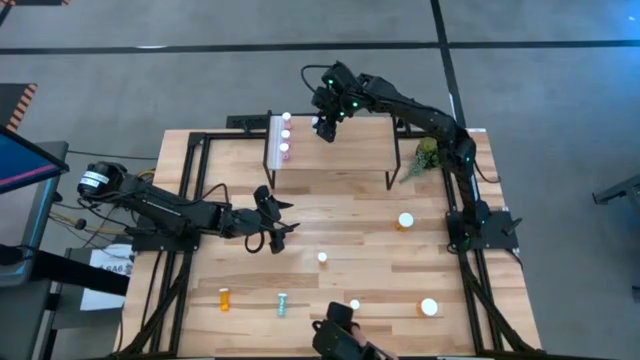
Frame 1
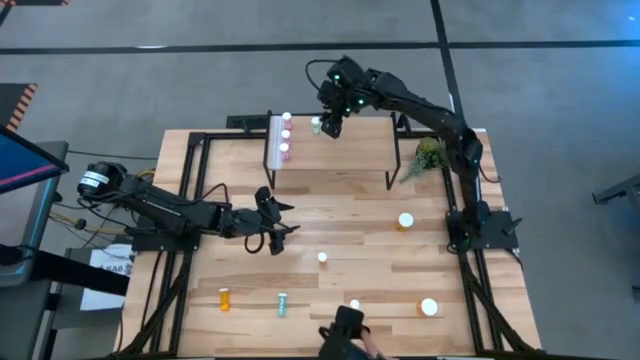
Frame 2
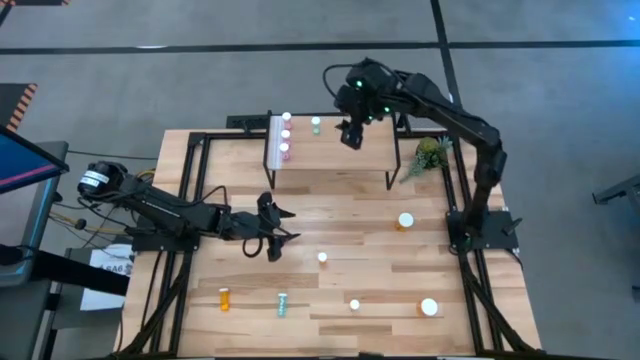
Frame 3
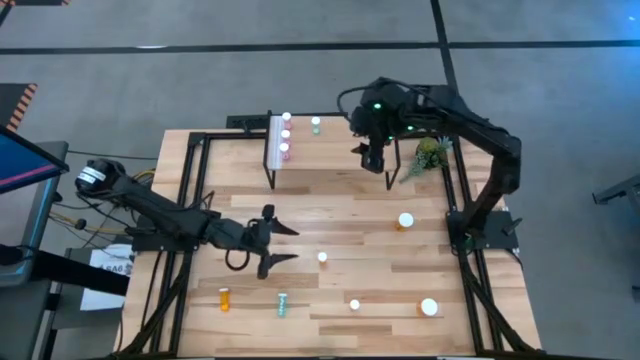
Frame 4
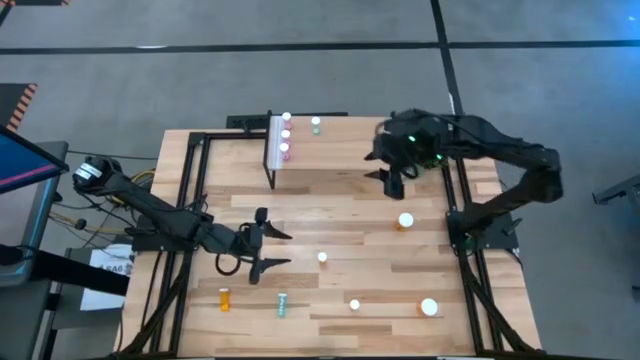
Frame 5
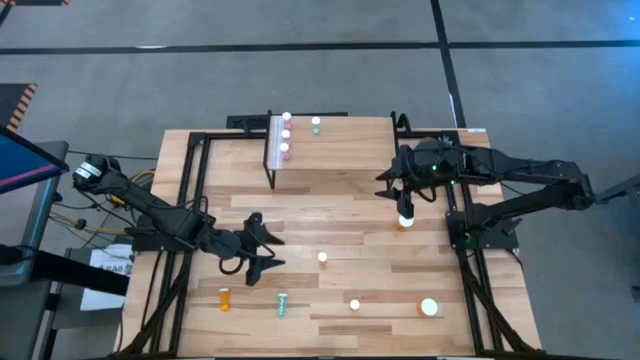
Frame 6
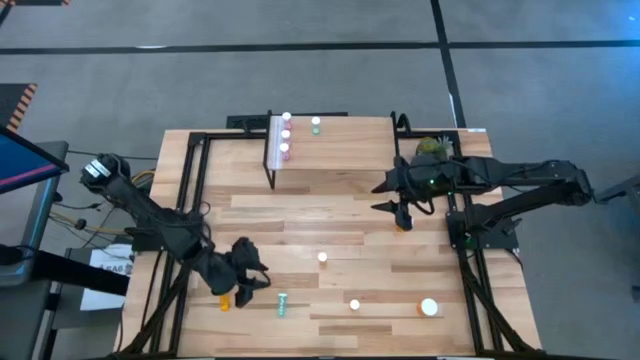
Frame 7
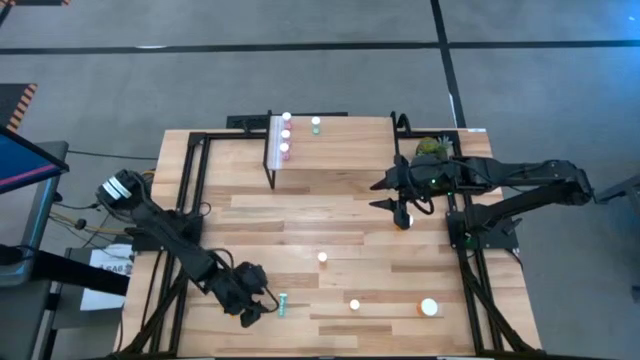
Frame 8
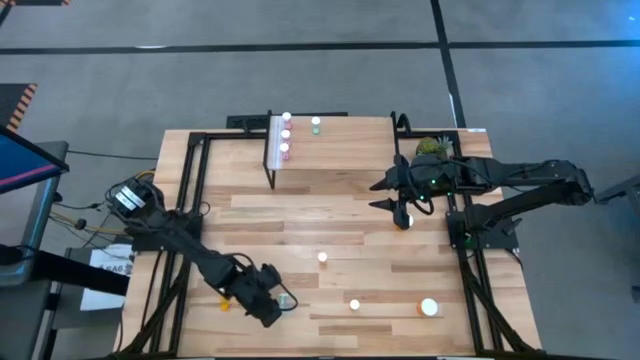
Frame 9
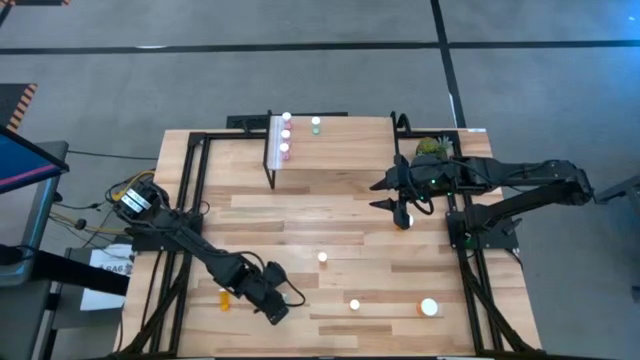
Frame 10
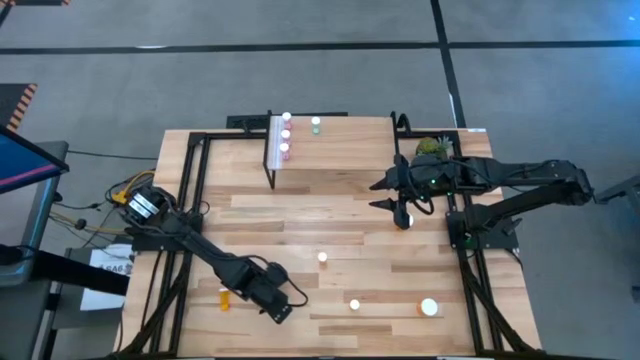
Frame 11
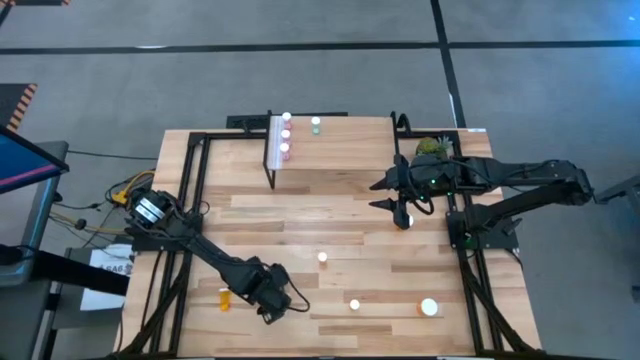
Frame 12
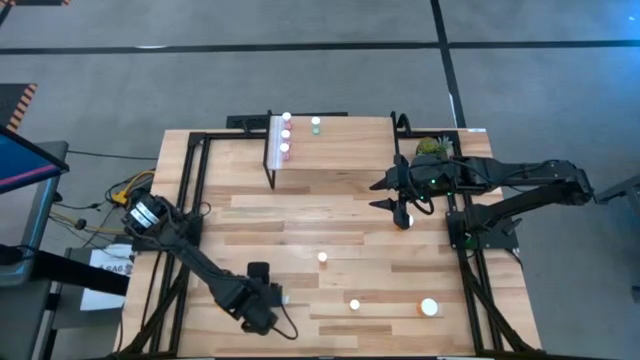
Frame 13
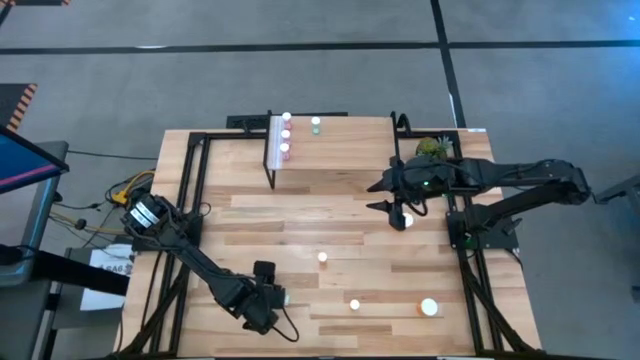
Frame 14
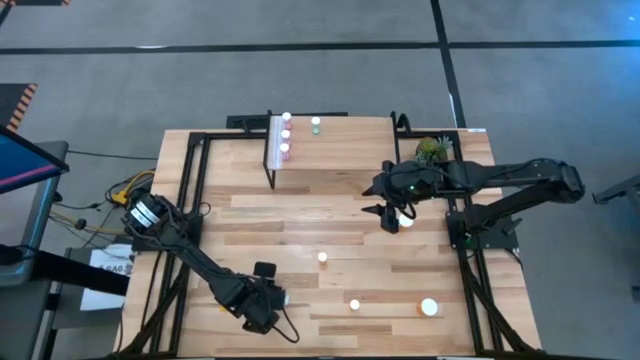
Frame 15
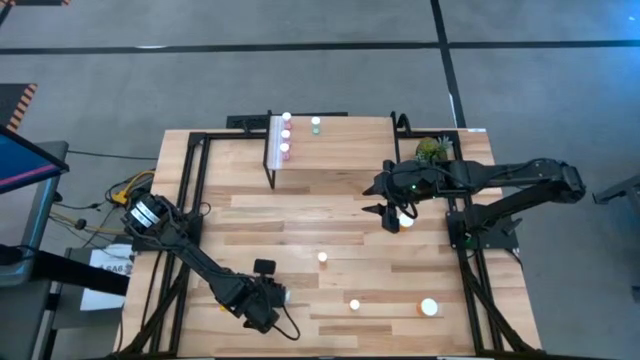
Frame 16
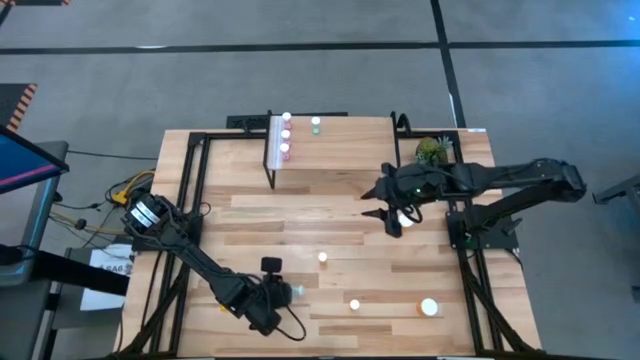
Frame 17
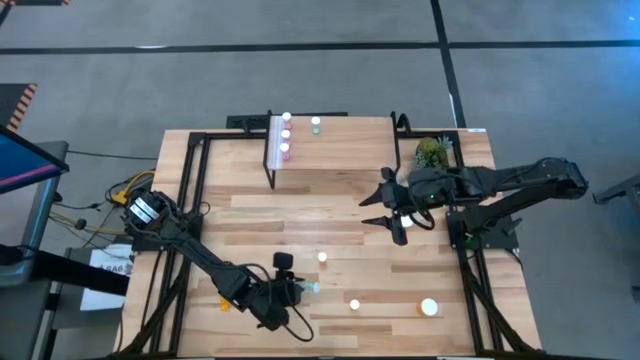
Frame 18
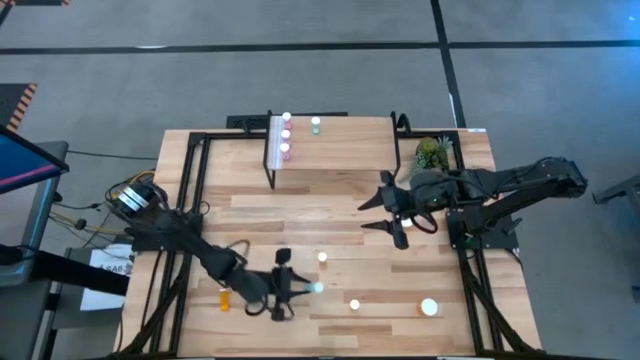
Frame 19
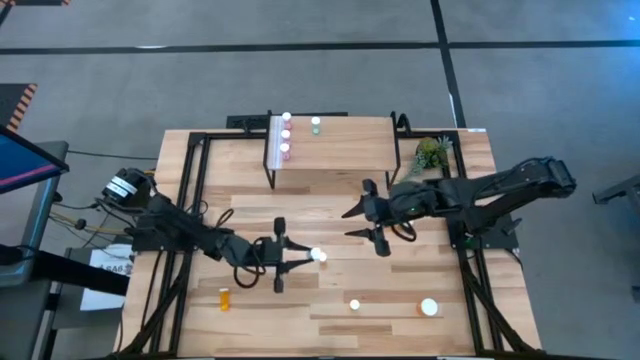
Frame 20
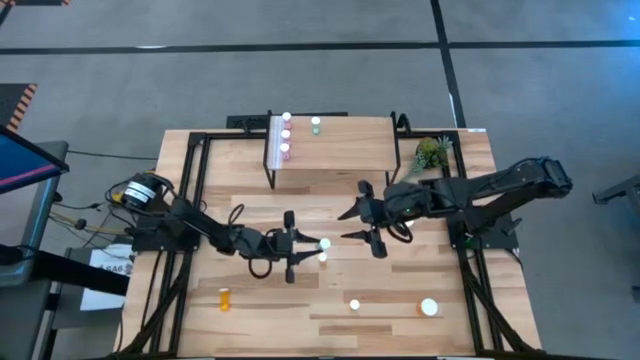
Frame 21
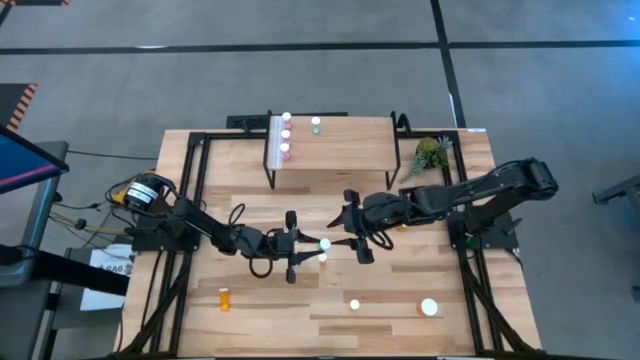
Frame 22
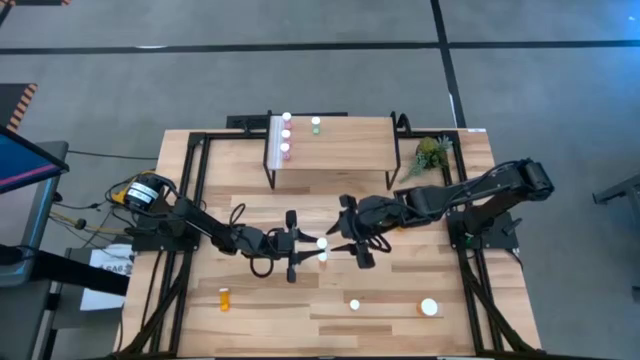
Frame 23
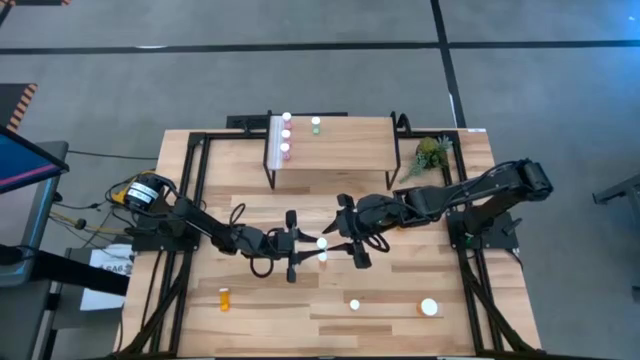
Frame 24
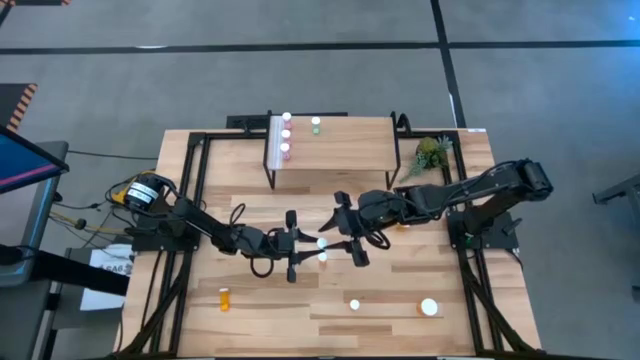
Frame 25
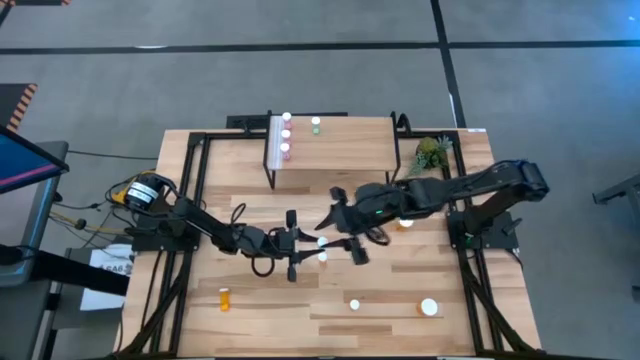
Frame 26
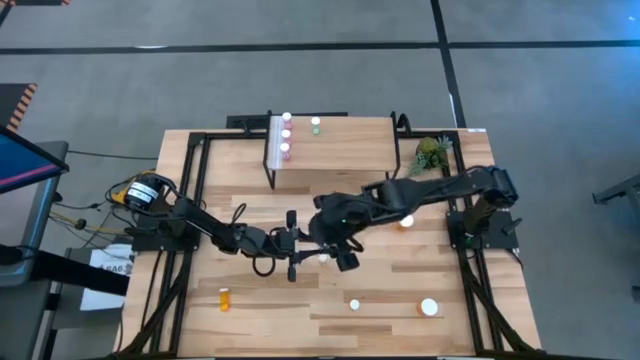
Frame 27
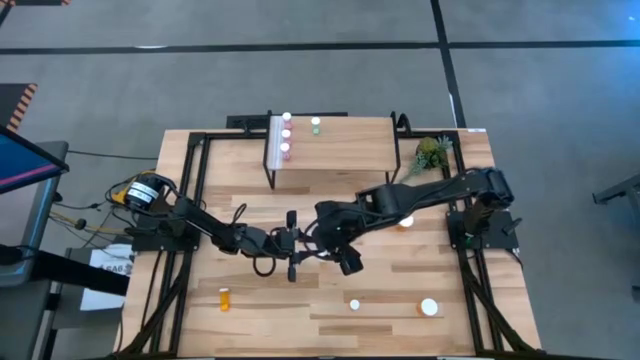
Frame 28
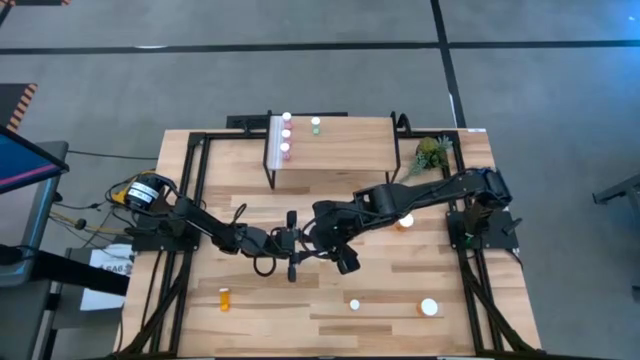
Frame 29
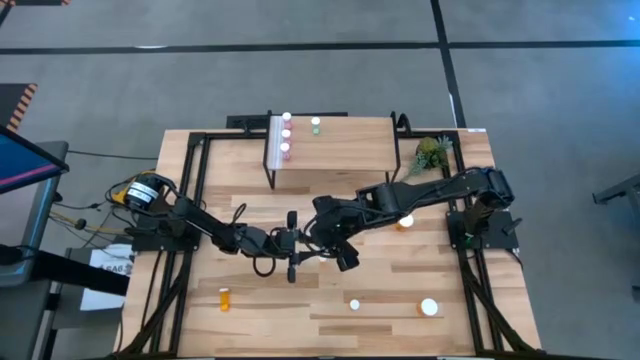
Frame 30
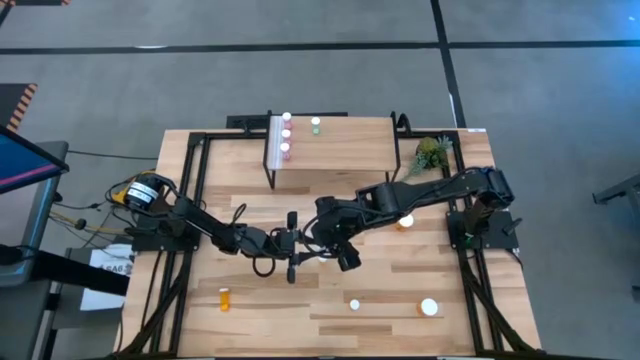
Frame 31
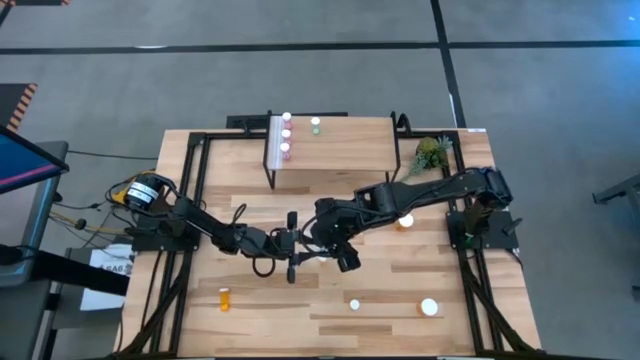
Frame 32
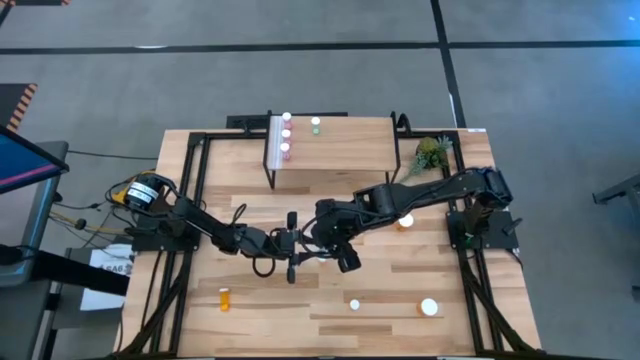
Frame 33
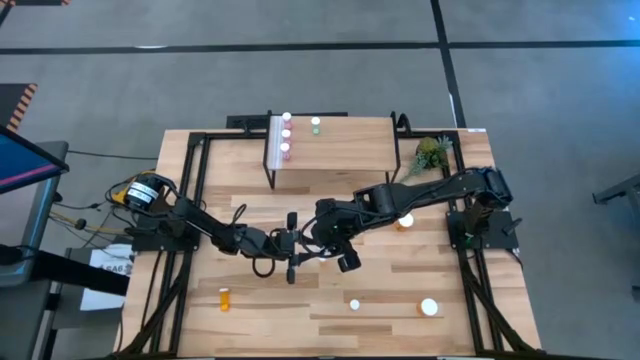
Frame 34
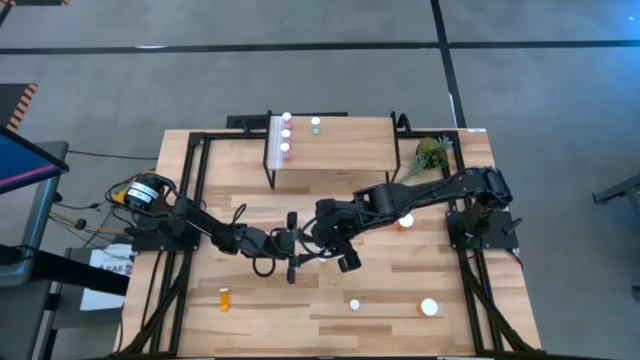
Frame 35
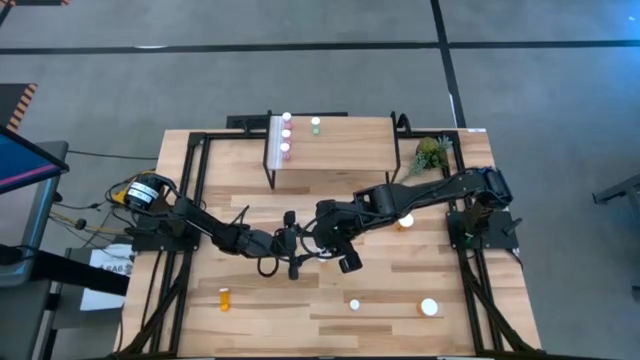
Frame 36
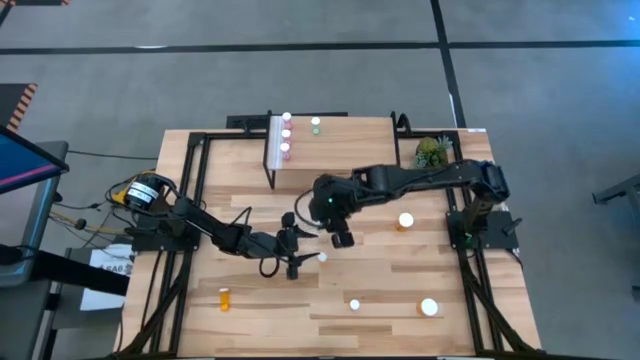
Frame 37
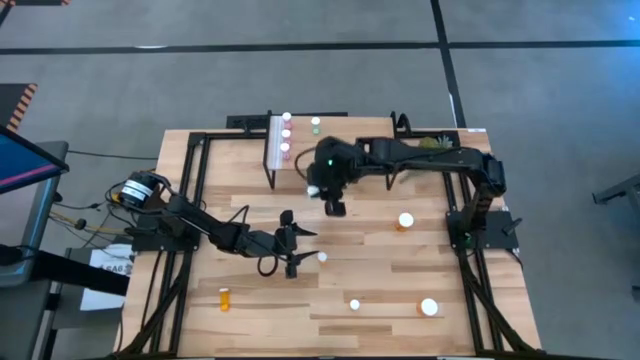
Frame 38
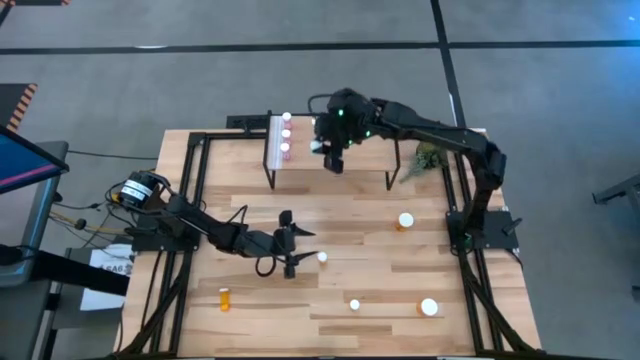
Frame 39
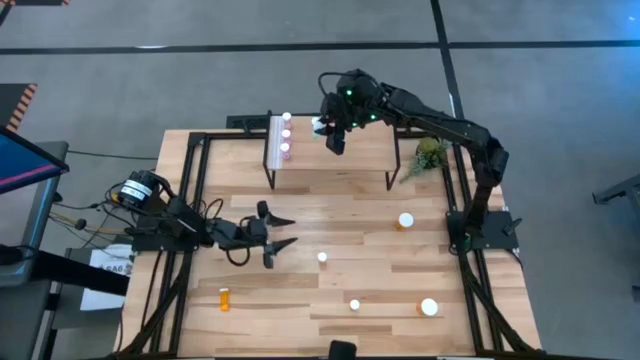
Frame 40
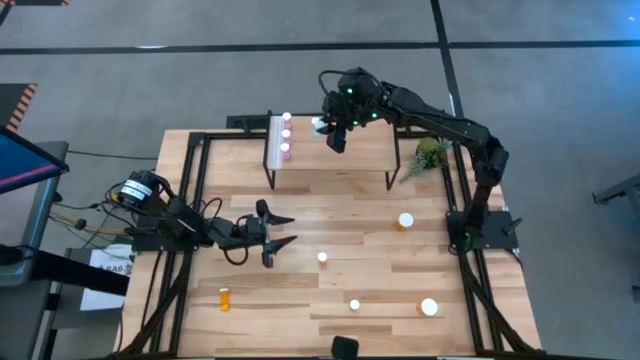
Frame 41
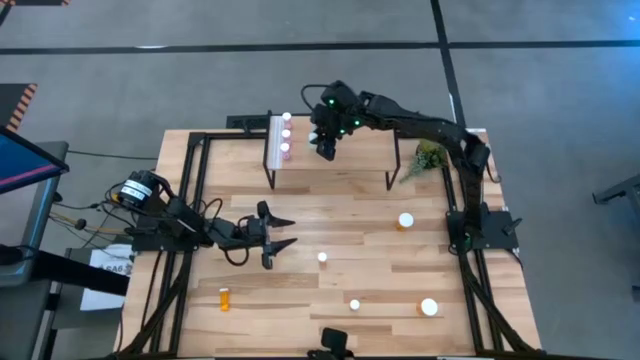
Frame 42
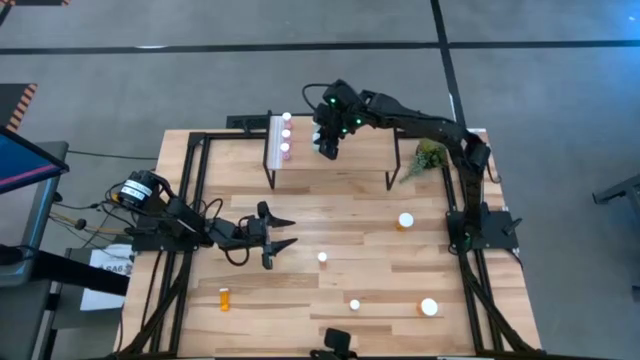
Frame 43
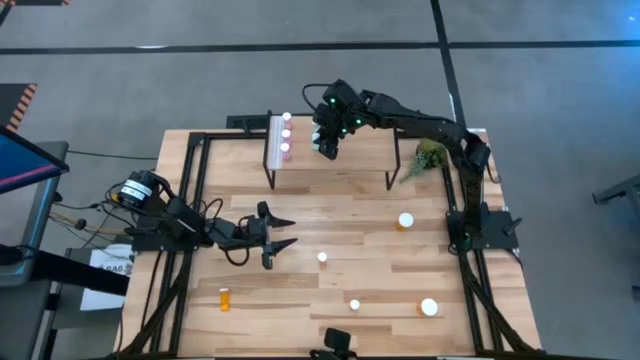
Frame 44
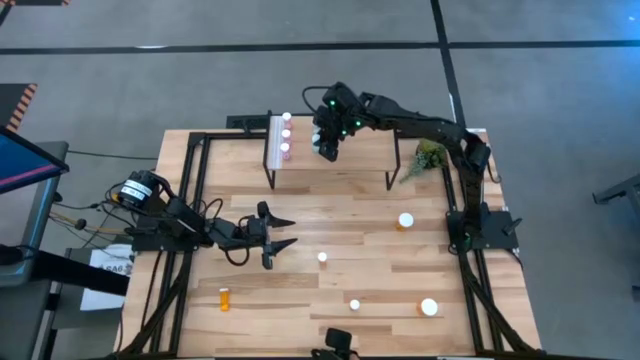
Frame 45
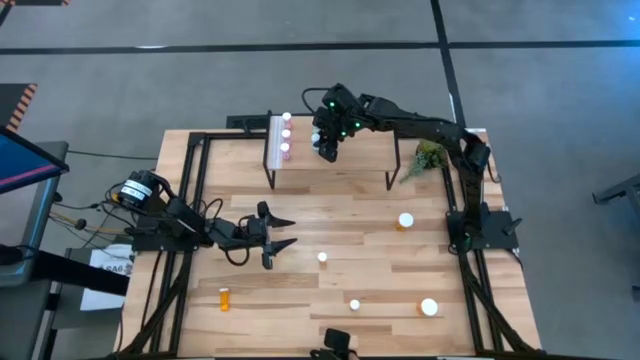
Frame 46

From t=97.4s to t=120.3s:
Task: Pick and place medicine bottles onto shelf by color
Put the green pill bottle on the shelf aligned with the other green pill bottle
